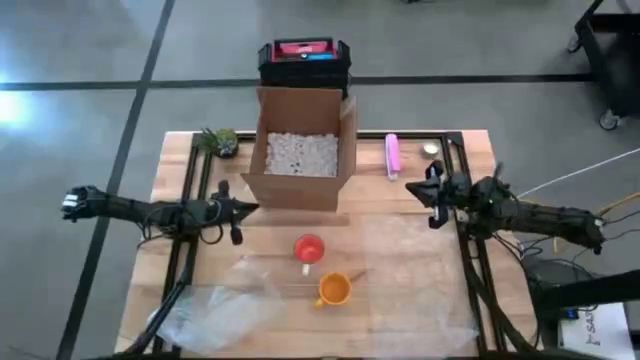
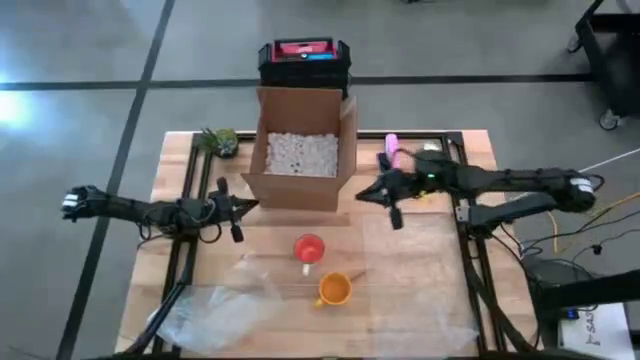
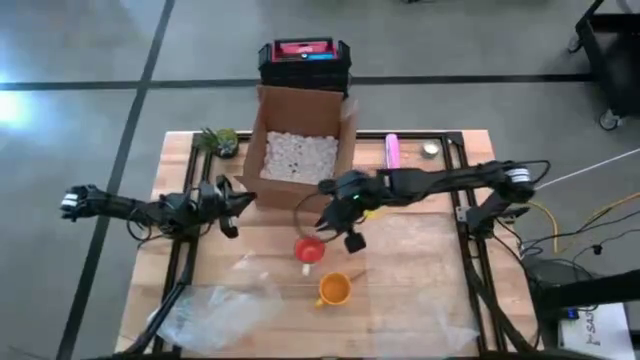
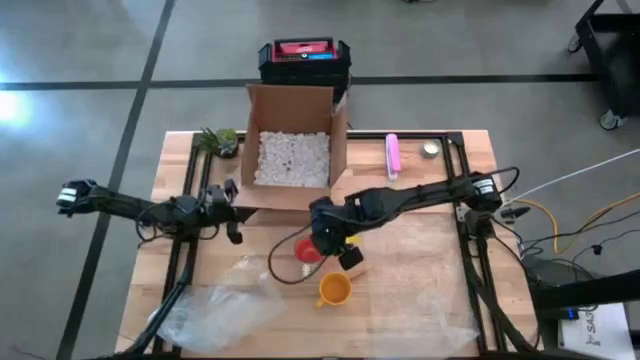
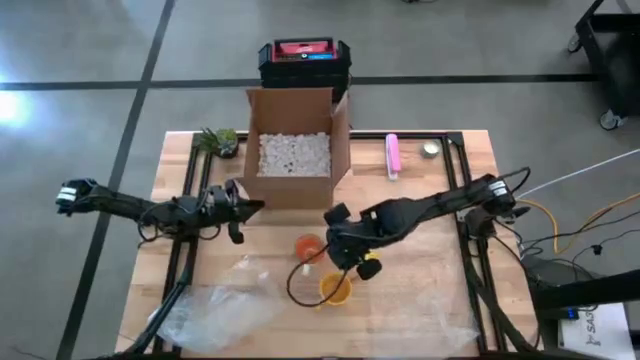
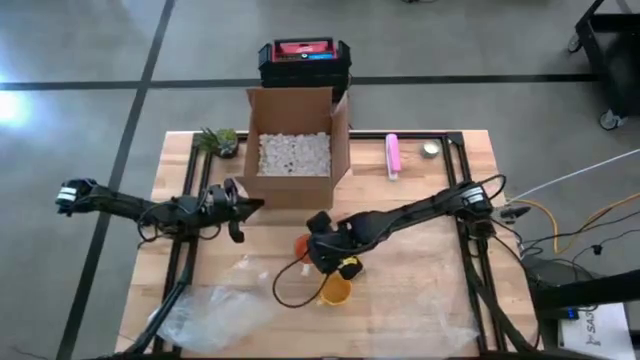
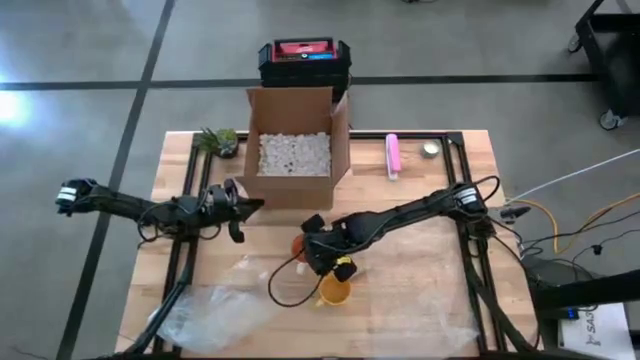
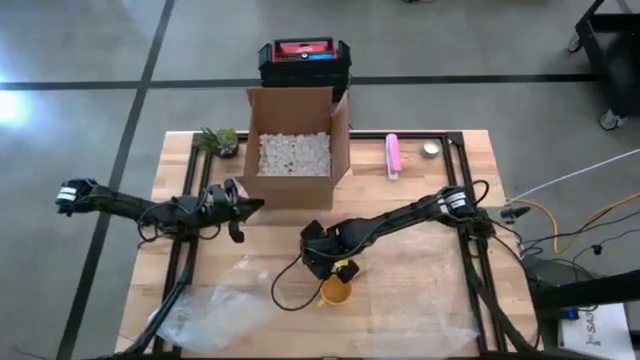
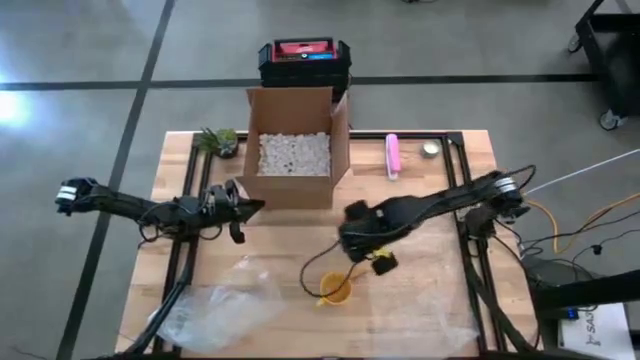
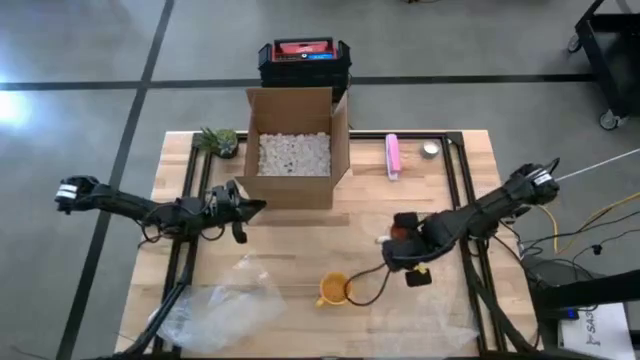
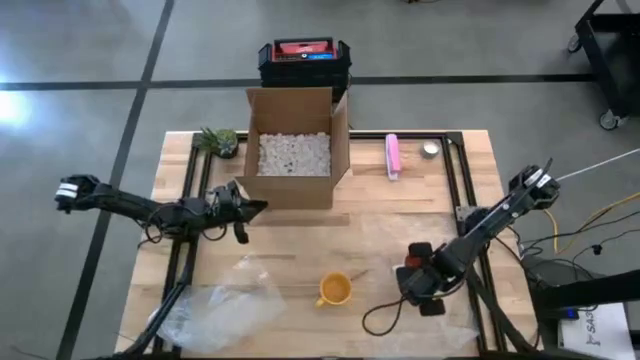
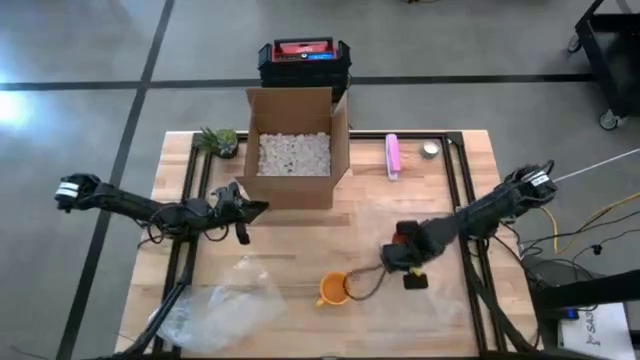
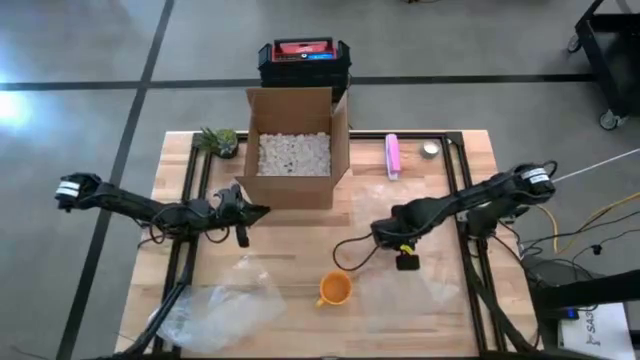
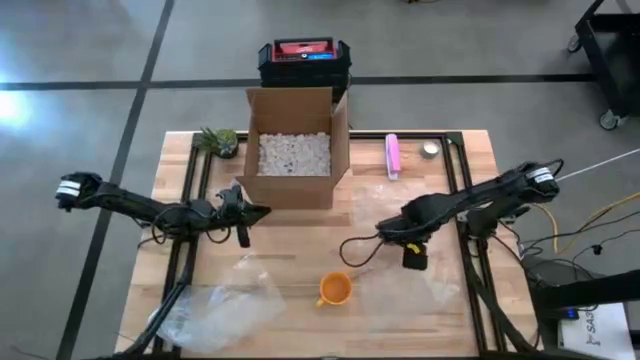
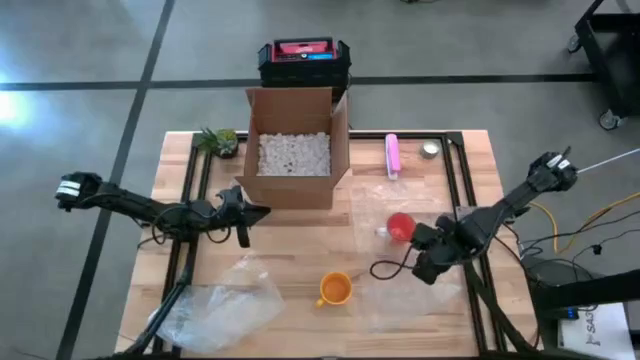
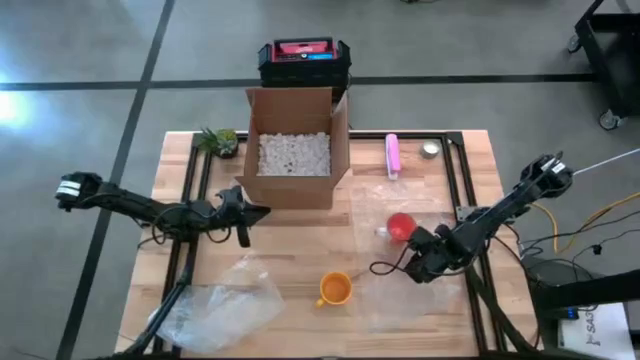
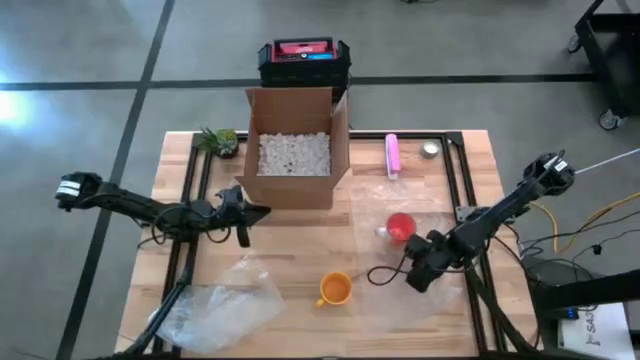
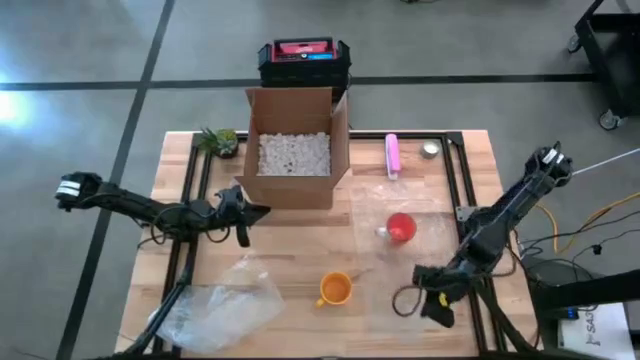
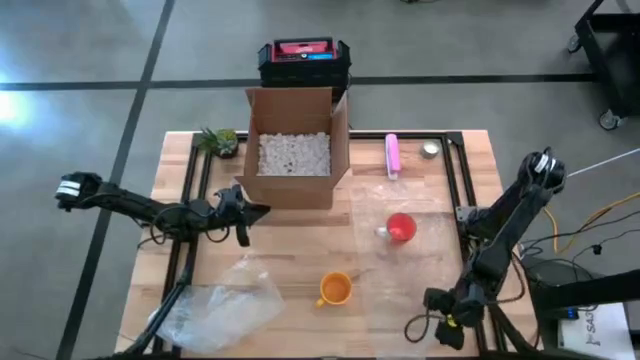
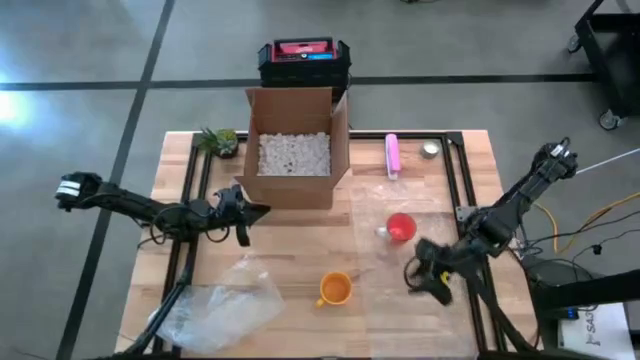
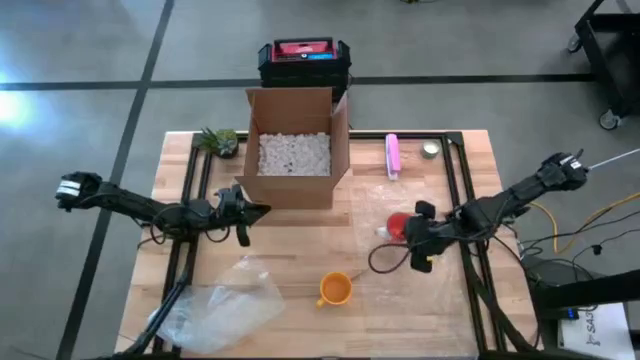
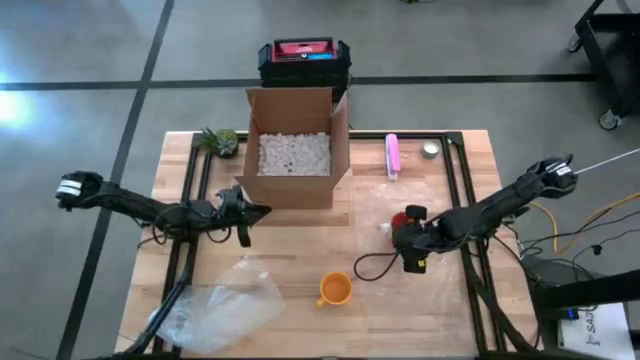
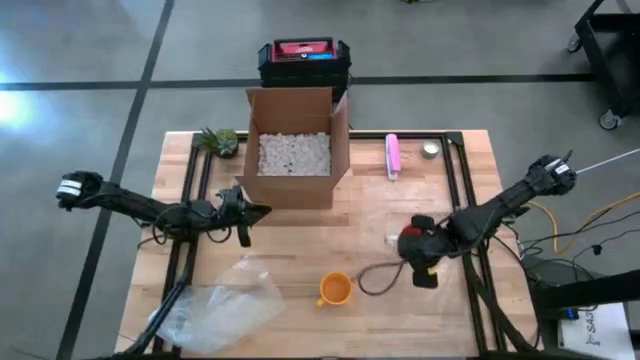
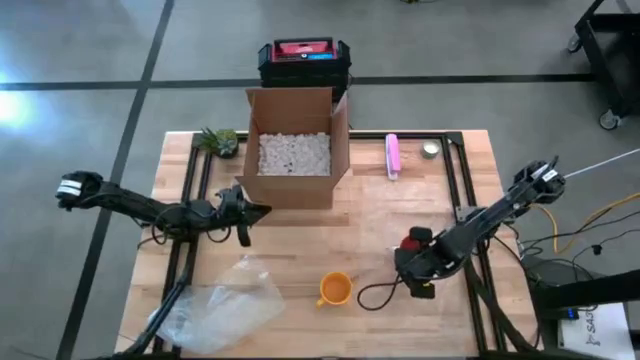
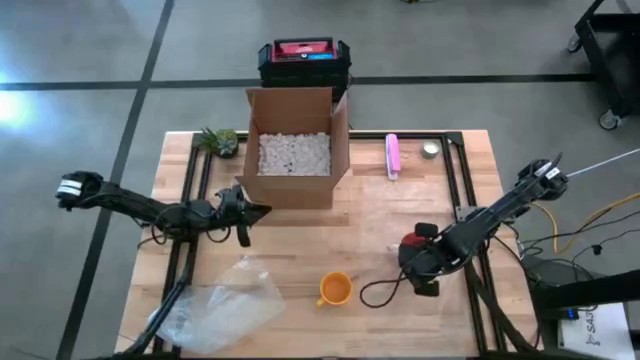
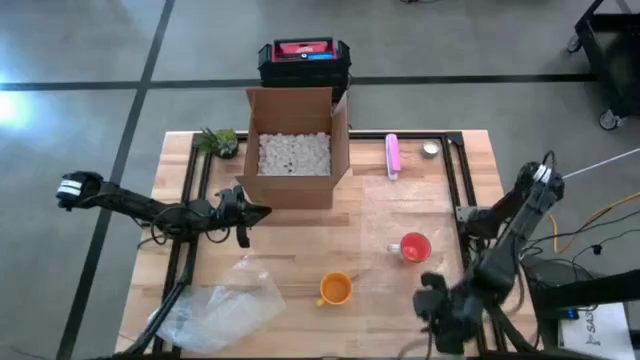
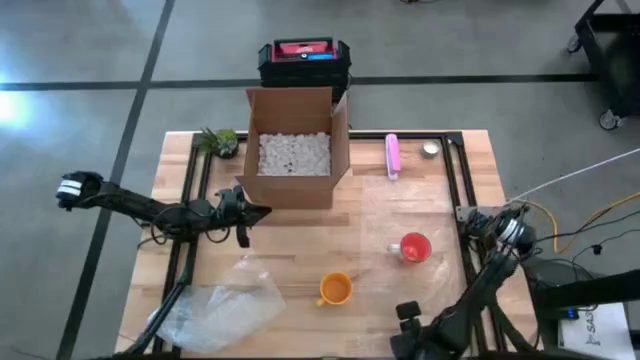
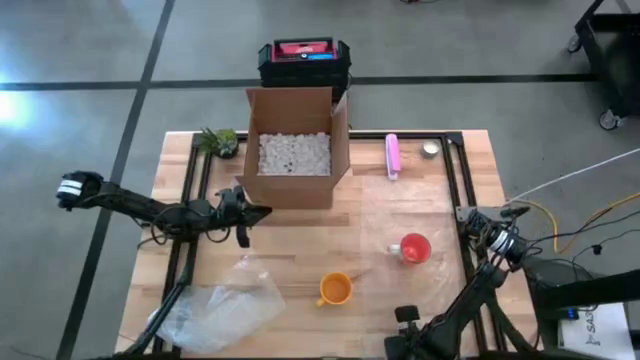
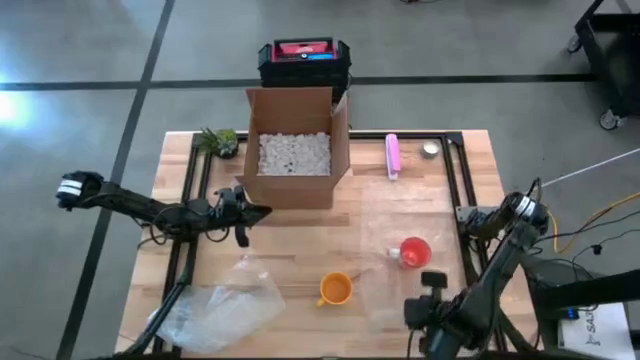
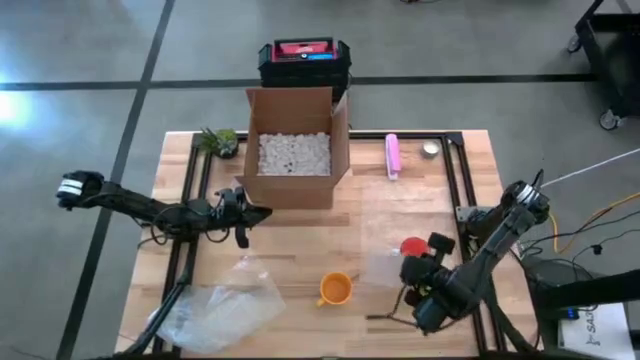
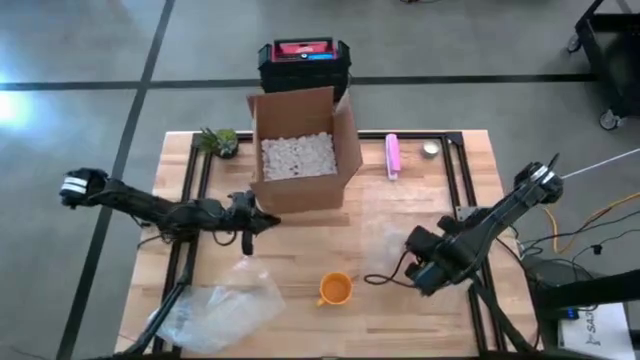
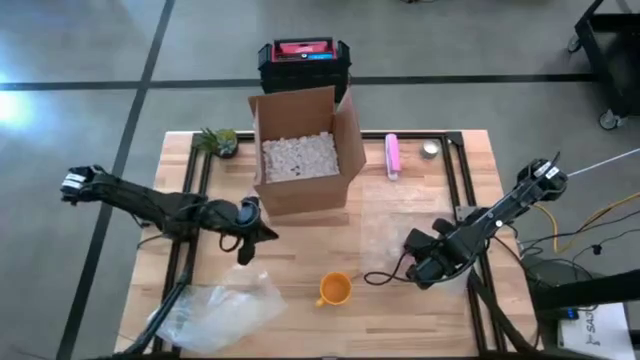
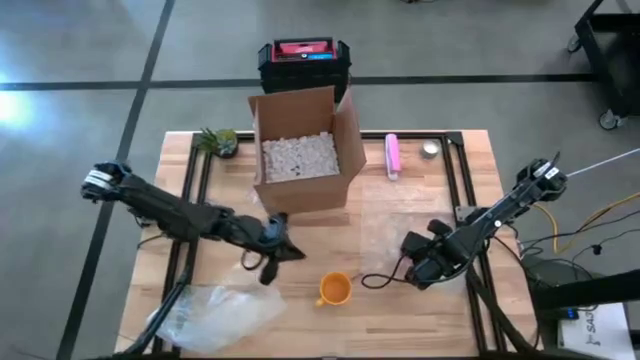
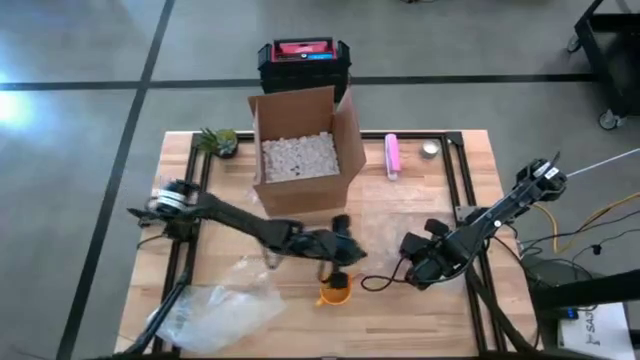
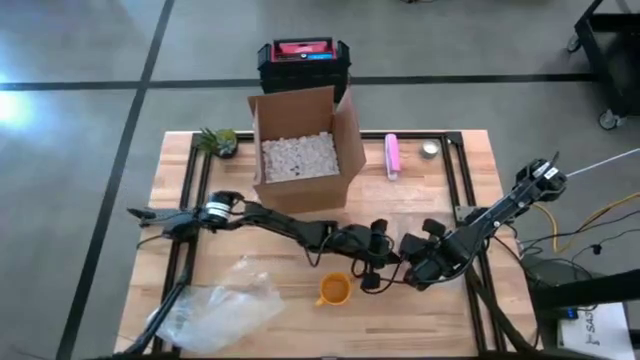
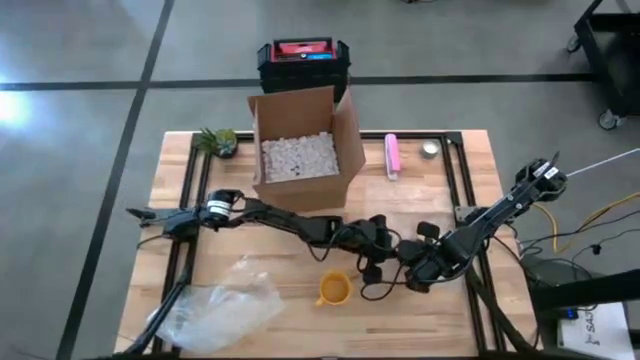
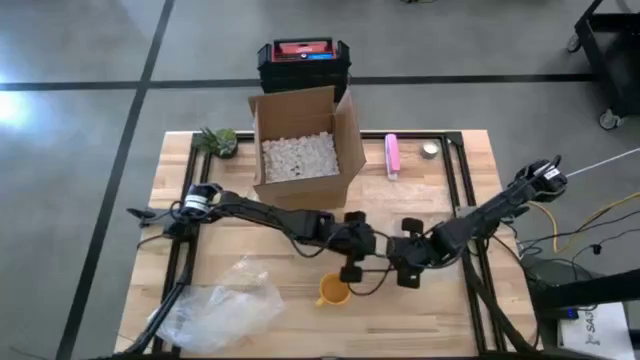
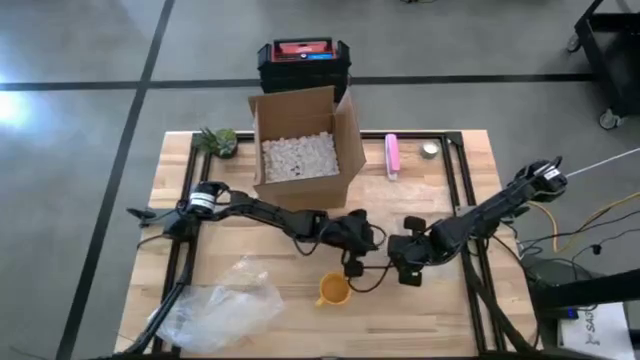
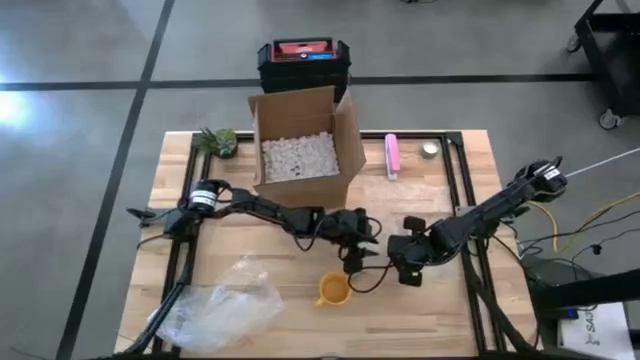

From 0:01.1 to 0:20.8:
Task: wrap mug
Wrap the orange mug in the right transparent bubble wrap
